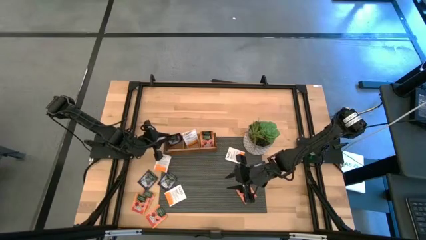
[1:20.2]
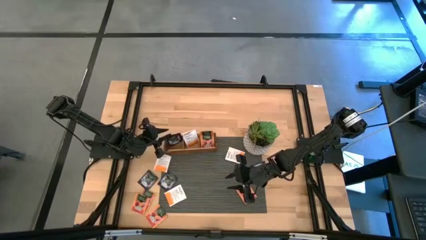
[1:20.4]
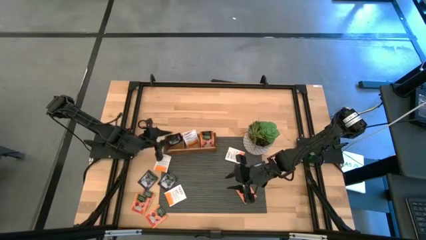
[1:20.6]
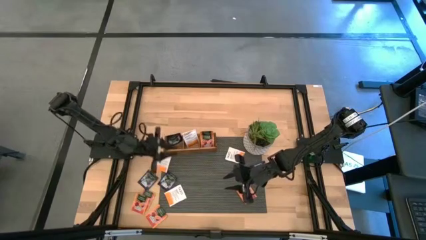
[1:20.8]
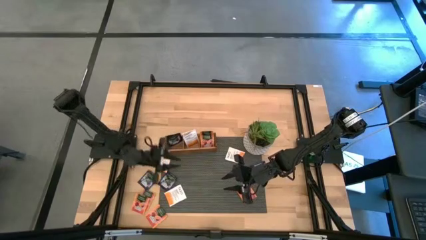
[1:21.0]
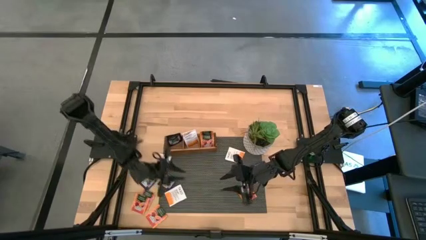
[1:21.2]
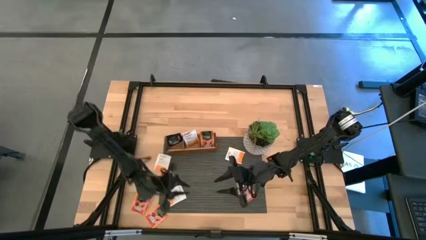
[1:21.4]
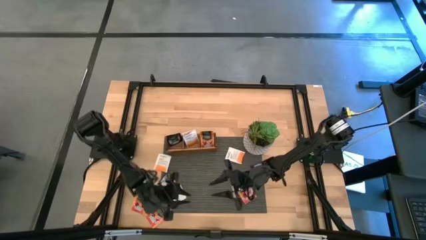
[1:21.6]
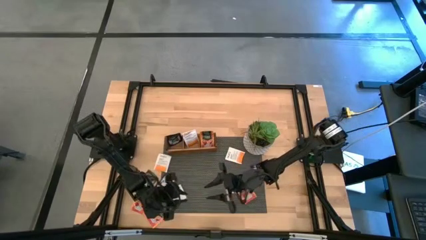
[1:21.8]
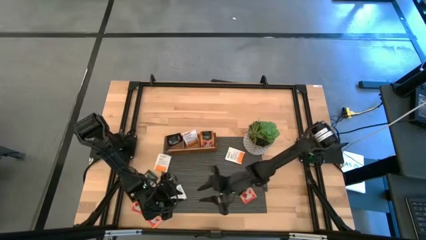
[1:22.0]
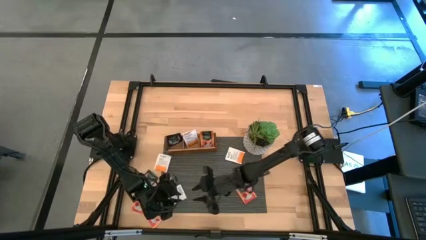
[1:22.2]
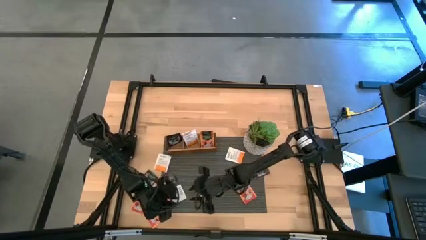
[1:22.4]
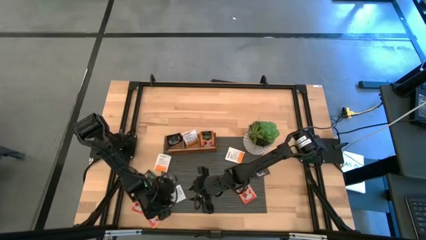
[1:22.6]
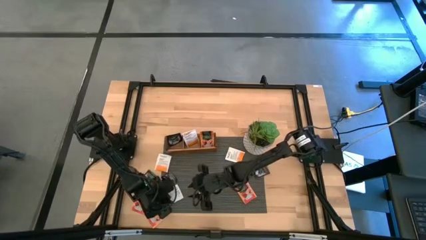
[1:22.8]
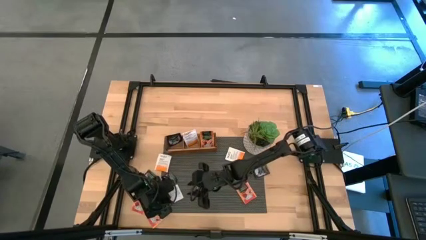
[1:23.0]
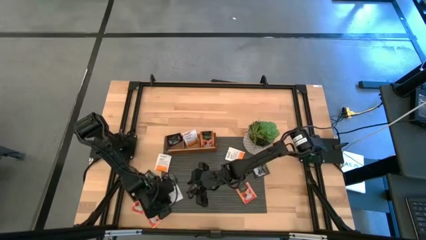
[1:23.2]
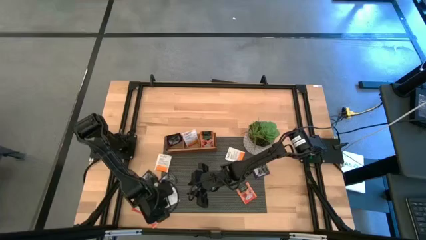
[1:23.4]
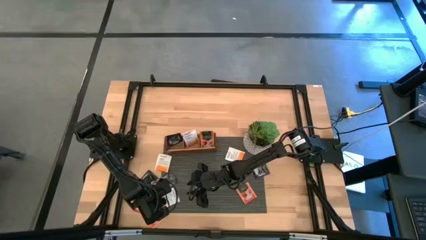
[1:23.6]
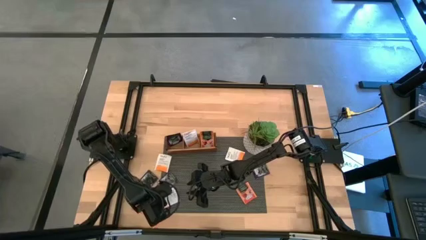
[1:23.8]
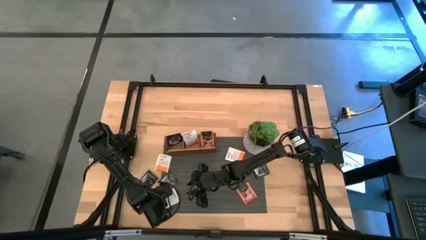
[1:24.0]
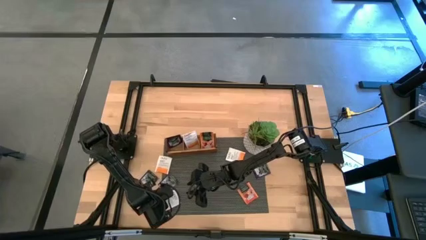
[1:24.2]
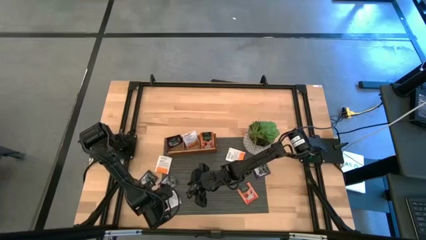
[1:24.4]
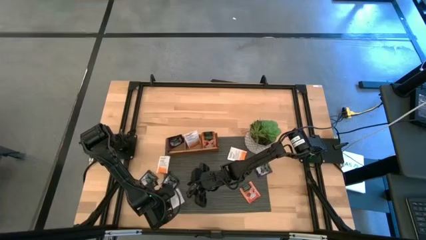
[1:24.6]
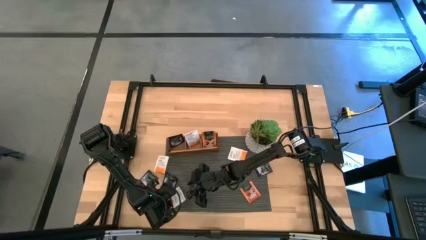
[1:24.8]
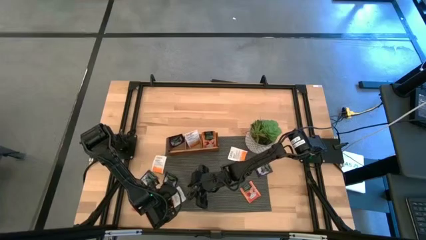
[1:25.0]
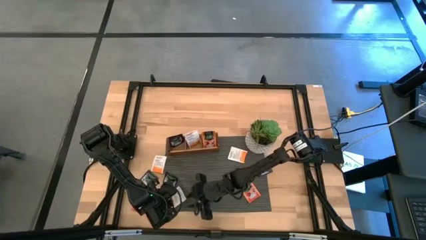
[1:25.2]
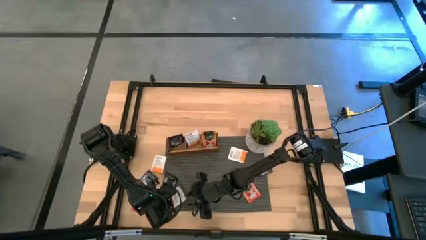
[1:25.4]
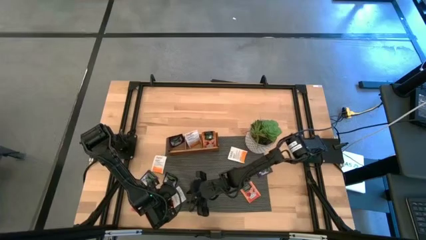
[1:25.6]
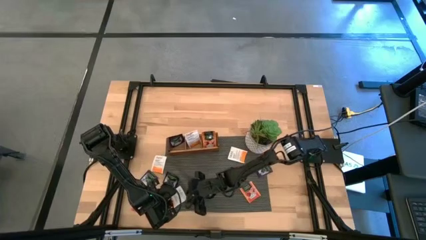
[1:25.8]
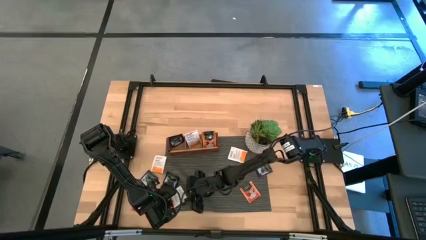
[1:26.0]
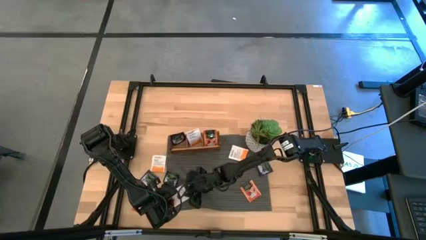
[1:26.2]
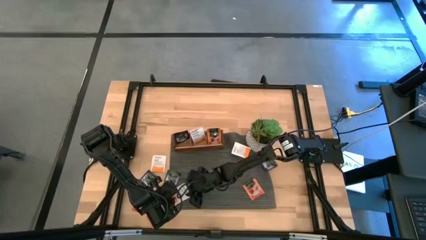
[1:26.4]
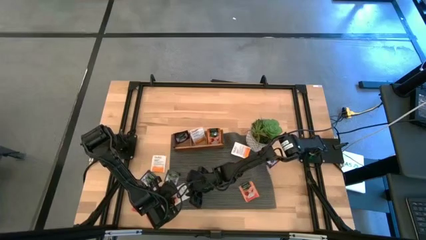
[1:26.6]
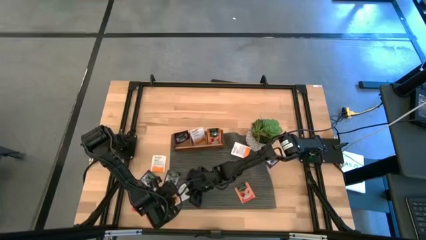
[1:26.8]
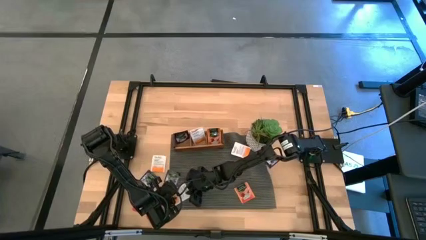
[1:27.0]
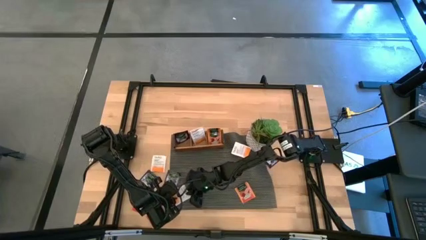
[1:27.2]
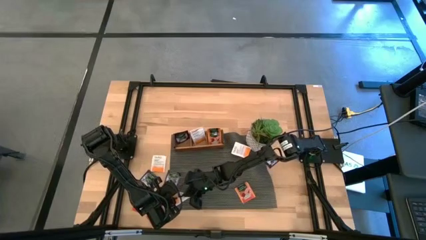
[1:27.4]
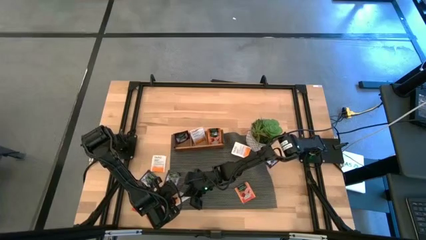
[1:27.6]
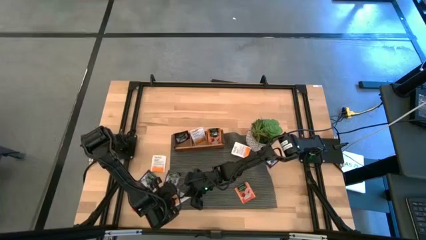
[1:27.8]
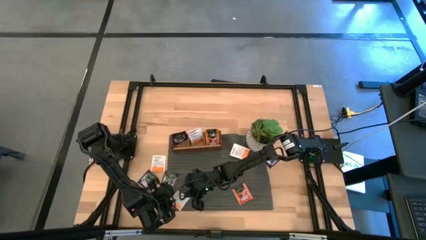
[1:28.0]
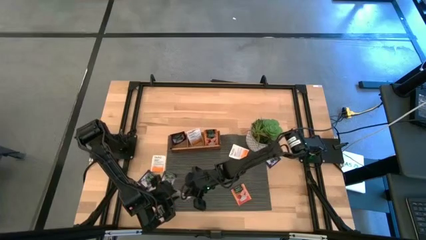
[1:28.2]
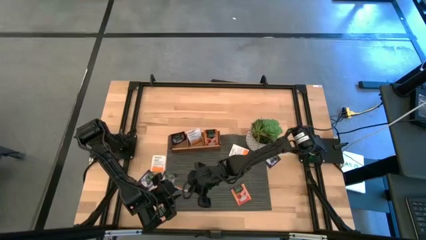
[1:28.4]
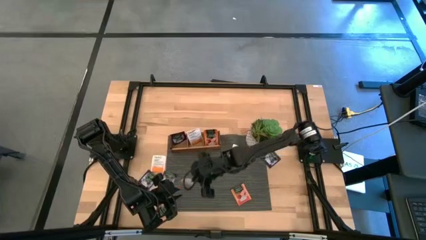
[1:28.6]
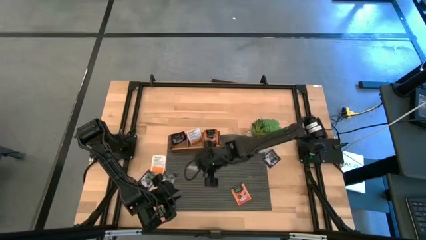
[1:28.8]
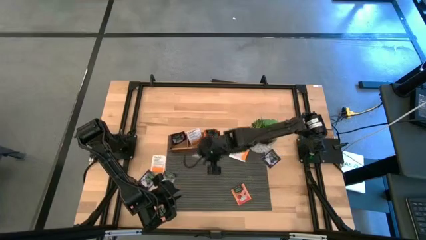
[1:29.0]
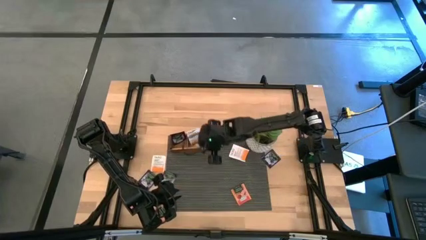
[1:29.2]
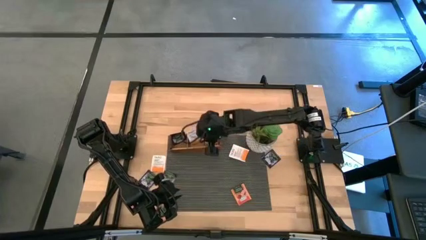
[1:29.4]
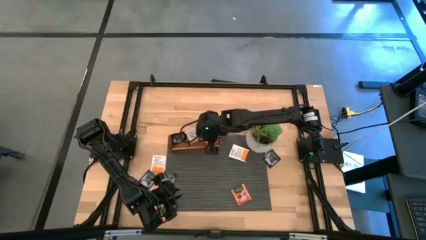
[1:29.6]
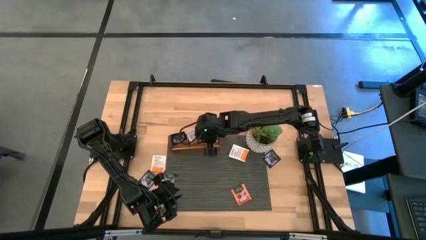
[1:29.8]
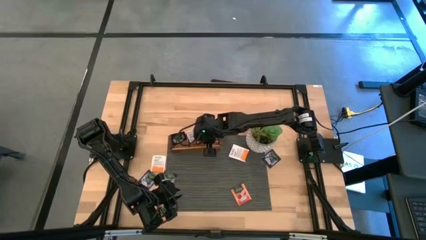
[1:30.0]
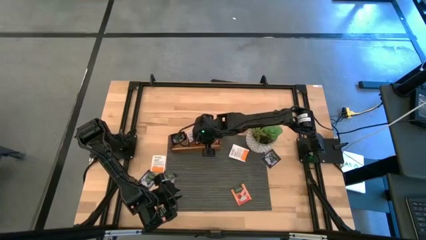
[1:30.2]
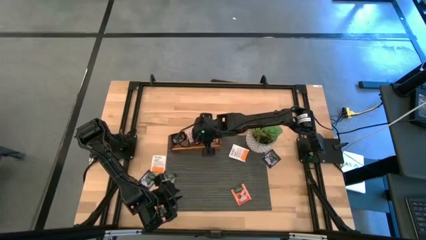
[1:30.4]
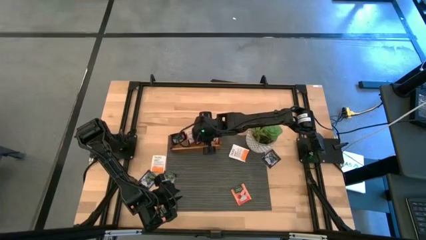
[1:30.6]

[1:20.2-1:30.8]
Task: Pick & Place Tea
Put the white tea bag to the middle section of the wooden organizer

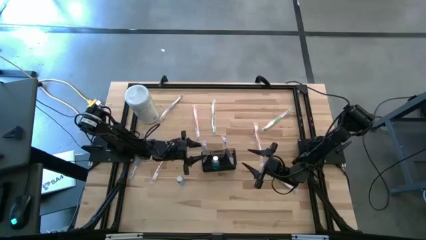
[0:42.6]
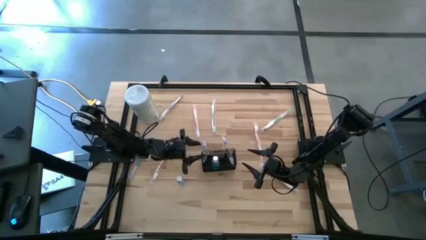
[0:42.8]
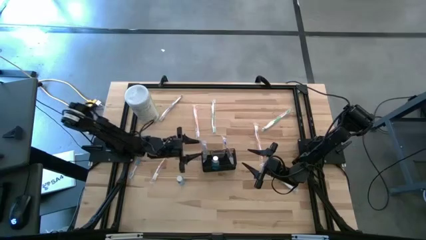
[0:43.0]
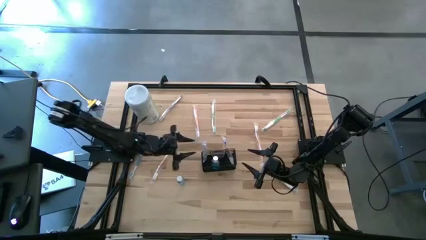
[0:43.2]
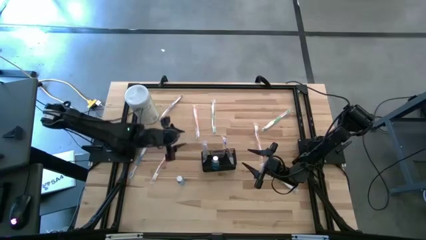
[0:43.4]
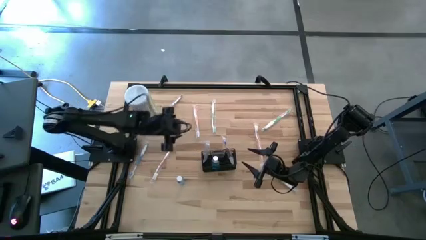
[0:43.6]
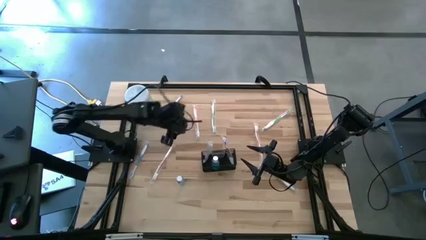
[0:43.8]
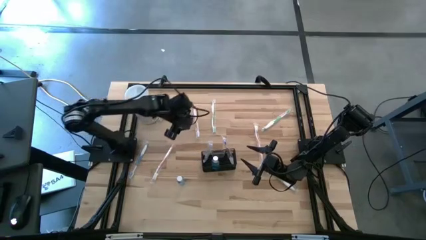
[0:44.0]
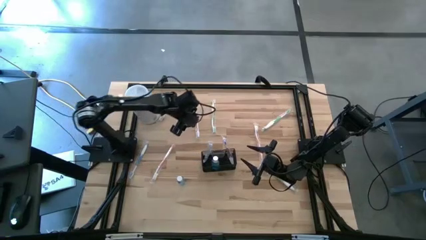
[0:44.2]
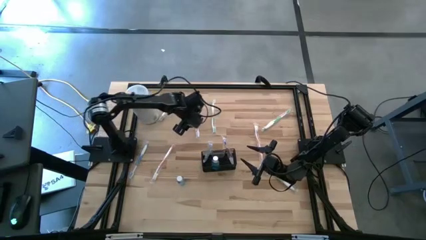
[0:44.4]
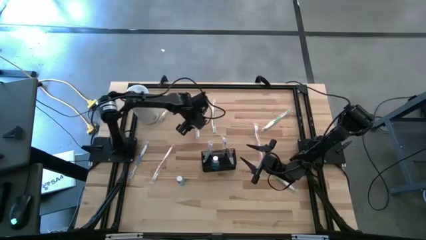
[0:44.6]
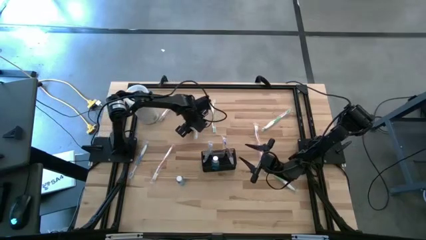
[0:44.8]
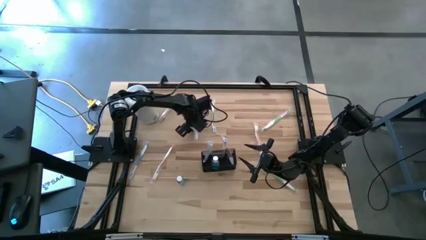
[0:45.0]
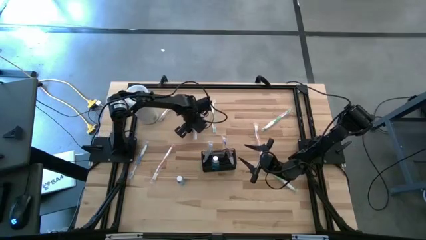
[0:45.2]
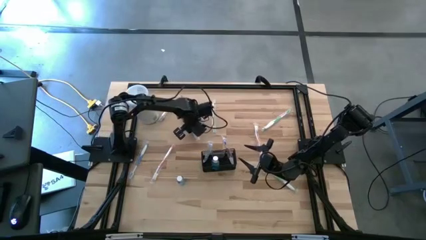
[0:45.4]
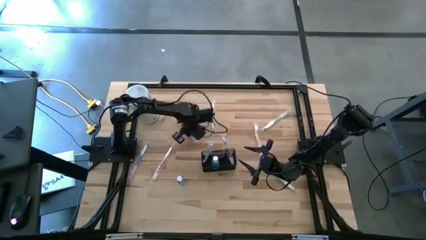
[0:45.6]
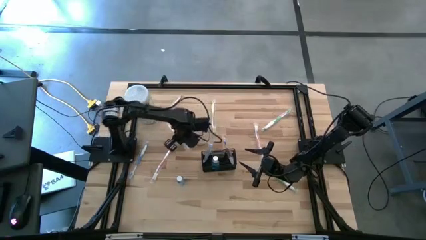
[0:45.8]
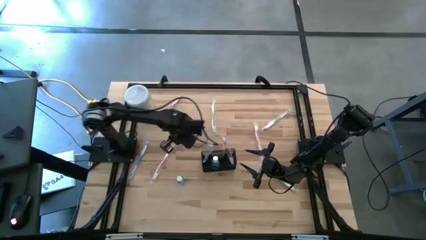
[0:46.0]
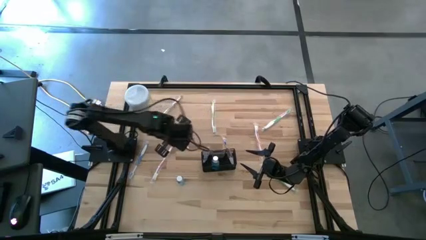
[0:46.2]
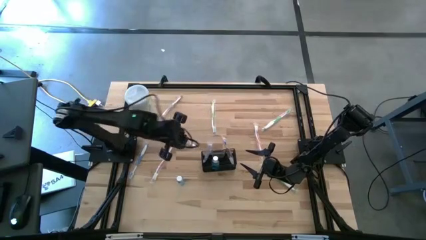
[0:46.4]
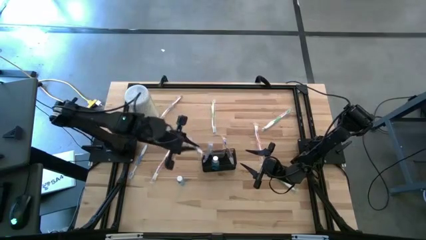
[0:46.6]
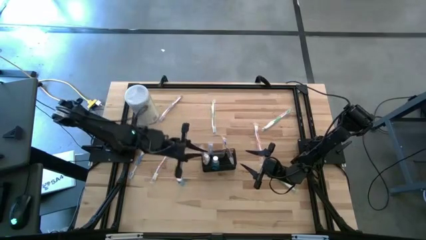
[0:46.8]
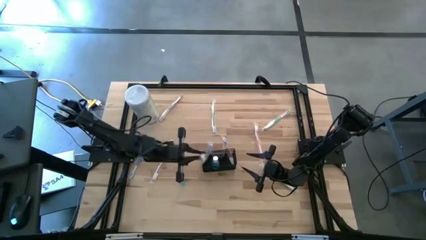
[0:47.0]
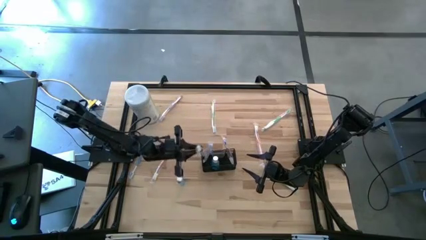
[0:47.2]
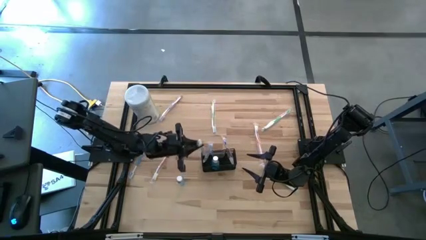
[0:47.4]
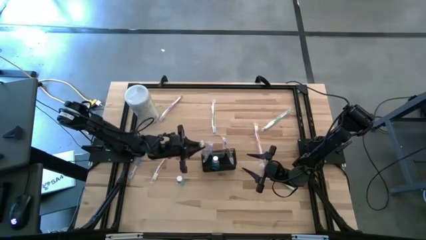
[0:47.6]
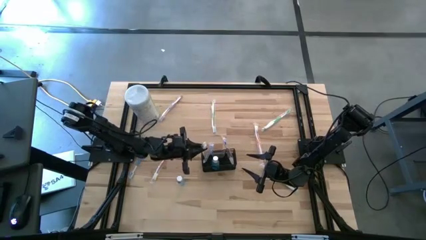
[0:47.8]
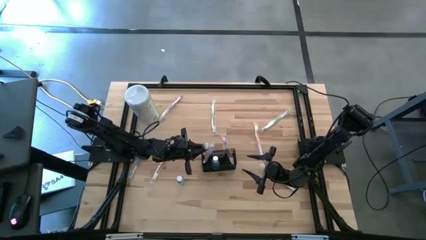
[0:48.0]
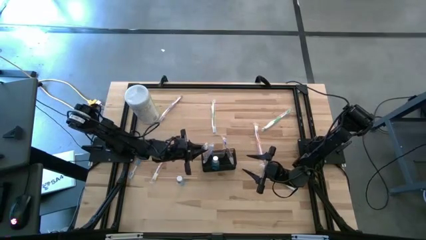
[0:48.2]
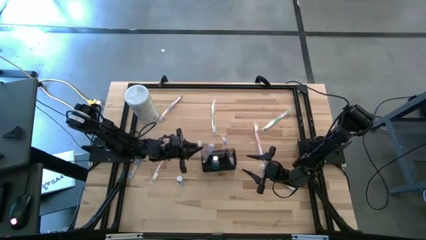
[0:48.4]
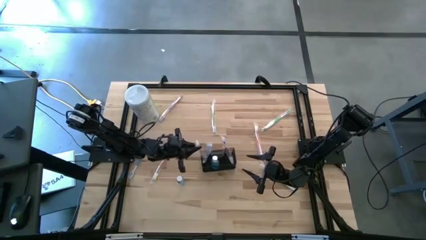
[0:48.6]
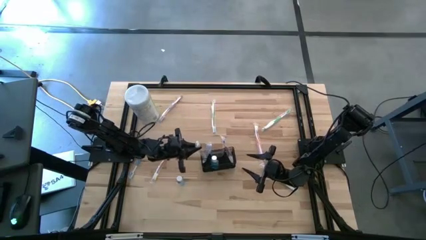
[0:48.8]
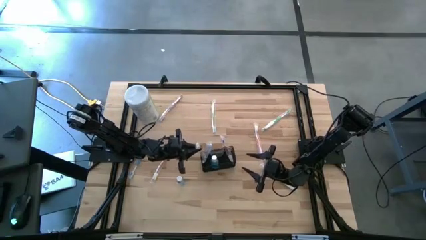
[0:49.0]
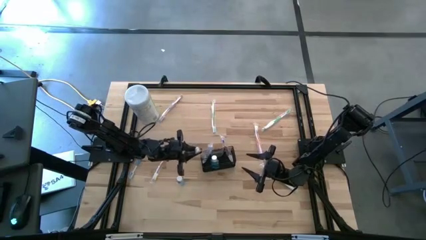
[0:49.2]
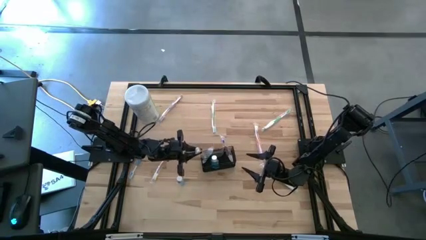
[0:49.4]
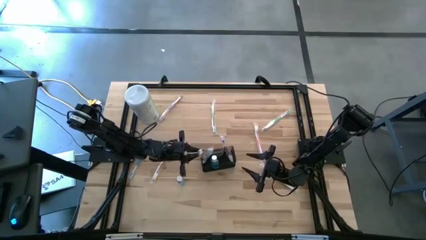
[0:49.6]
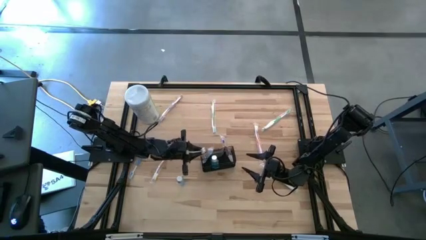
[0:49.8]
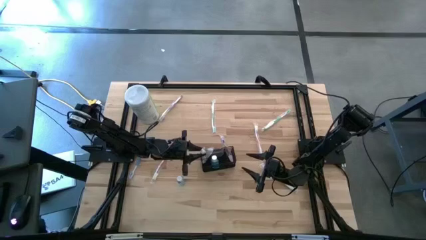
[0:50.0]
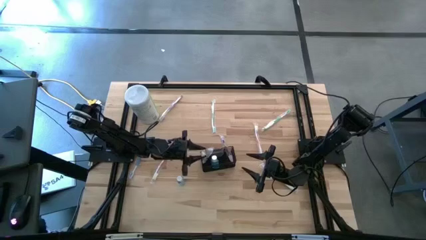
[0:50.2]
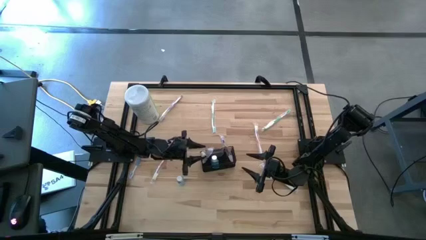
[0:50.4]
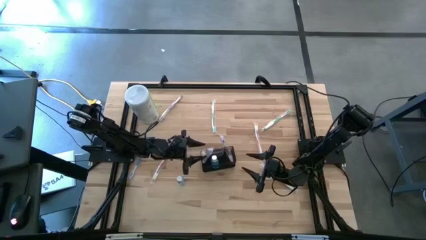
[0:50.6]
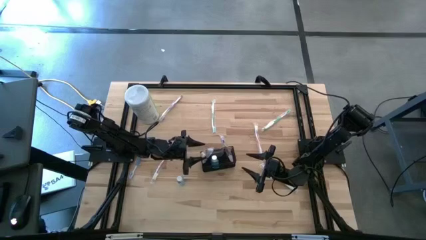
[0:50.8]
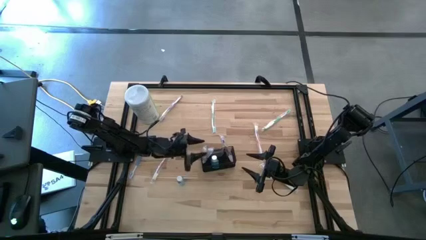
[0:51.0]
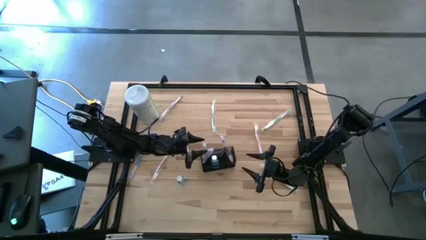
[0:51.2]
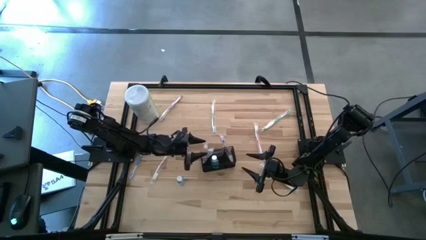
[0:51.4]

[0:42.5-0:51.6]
Task: Pick & Place toothbrushing station
Put the top orange toothbrush into the black wire organizer
